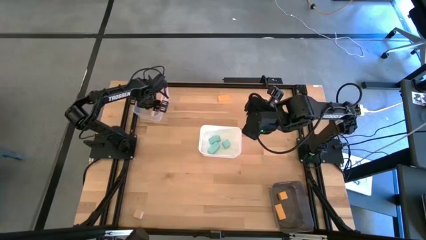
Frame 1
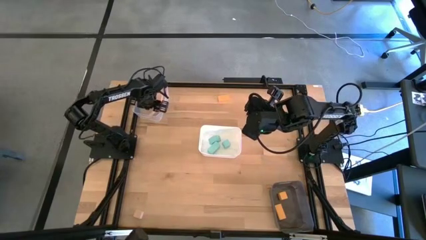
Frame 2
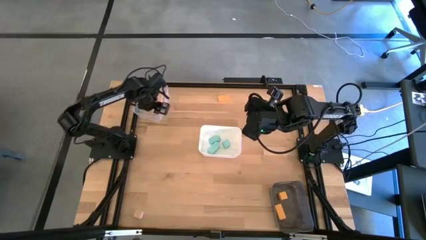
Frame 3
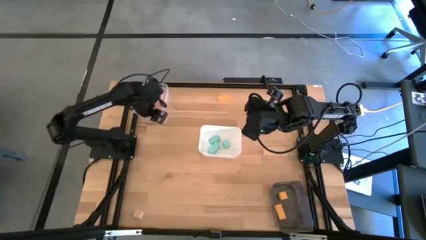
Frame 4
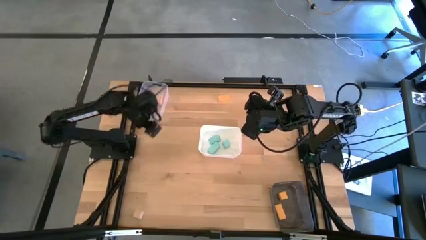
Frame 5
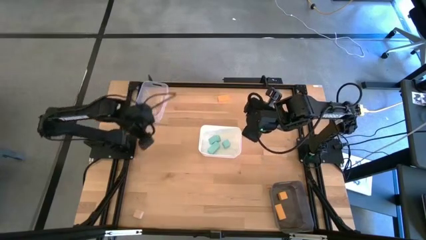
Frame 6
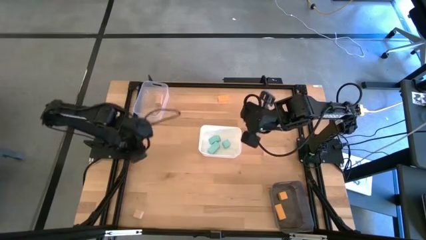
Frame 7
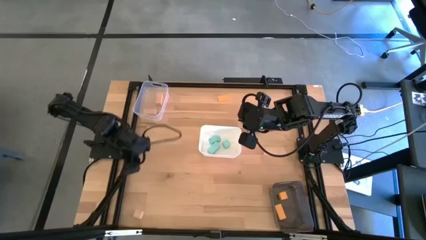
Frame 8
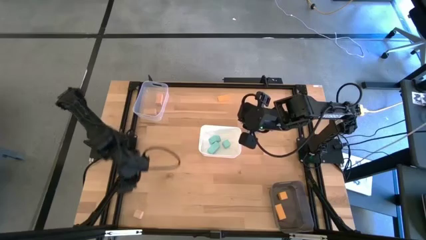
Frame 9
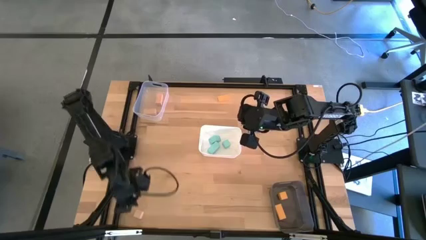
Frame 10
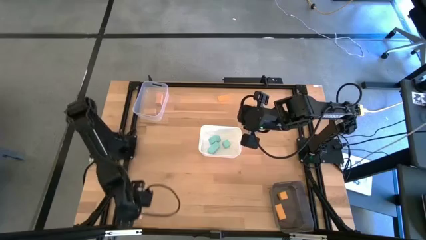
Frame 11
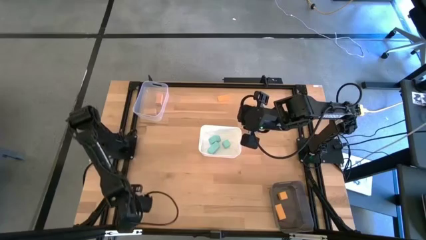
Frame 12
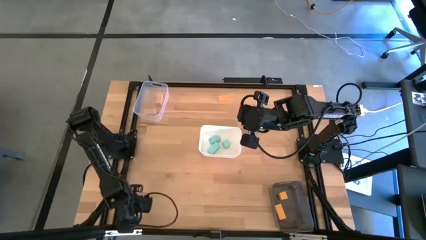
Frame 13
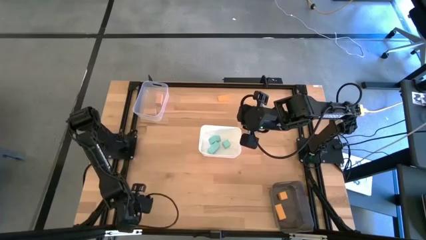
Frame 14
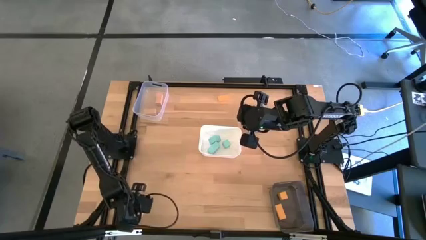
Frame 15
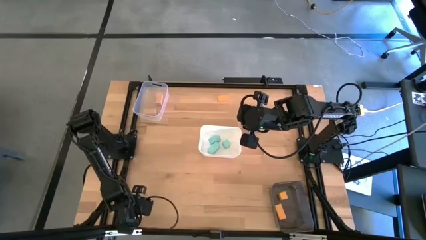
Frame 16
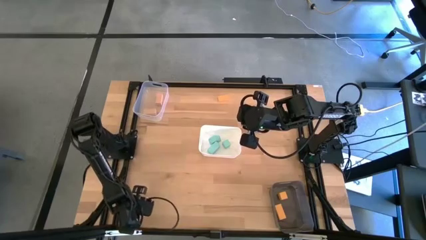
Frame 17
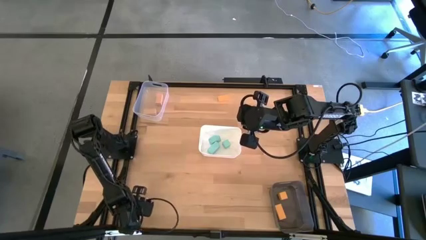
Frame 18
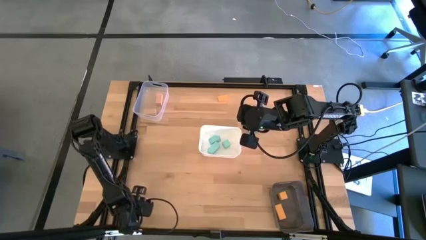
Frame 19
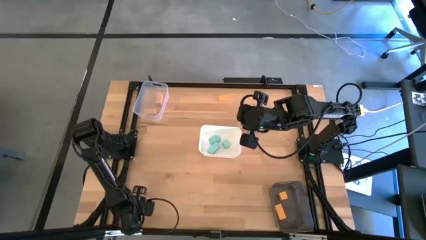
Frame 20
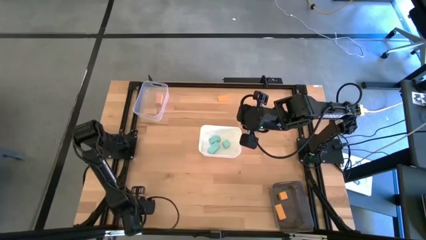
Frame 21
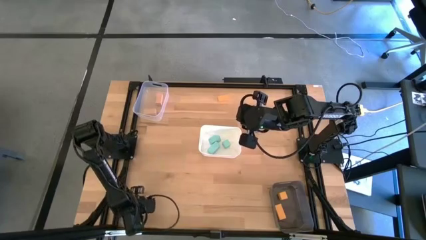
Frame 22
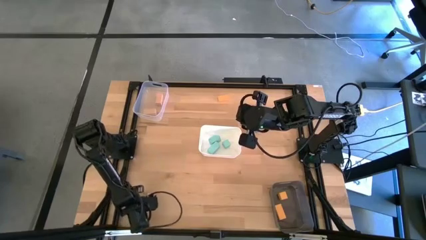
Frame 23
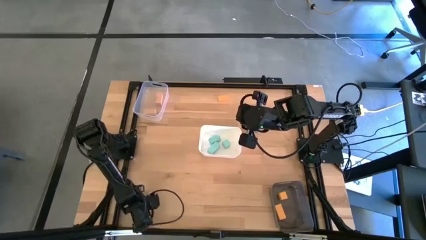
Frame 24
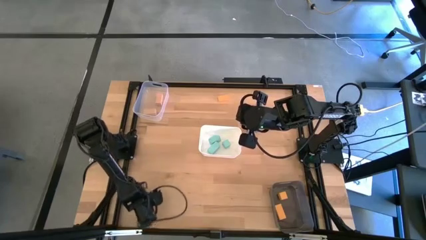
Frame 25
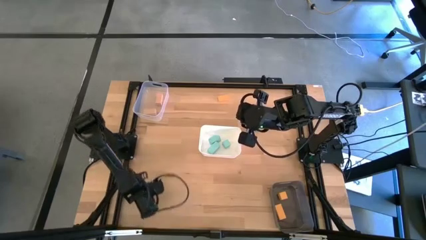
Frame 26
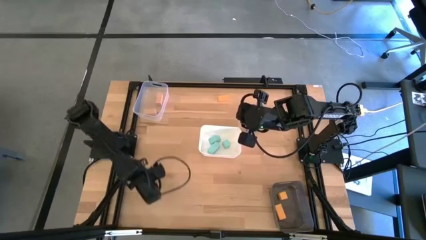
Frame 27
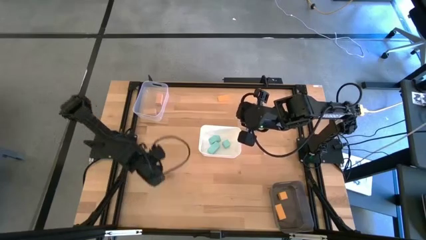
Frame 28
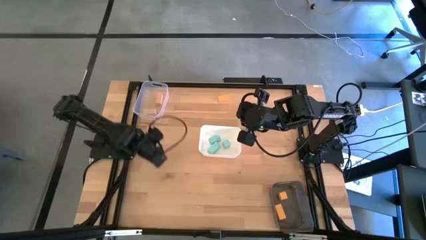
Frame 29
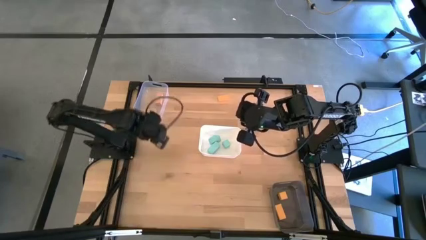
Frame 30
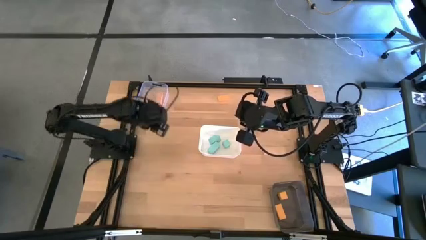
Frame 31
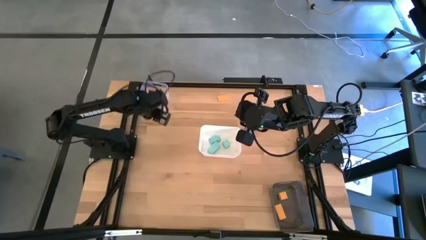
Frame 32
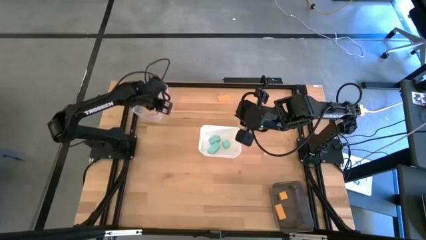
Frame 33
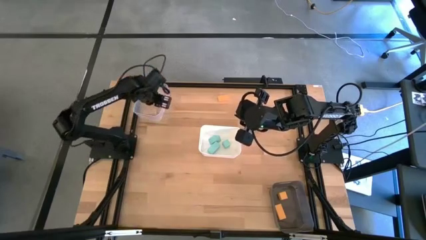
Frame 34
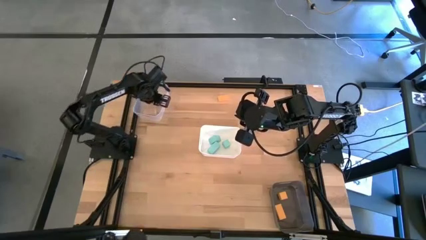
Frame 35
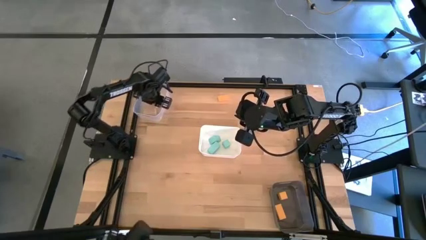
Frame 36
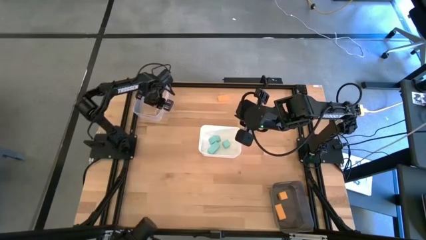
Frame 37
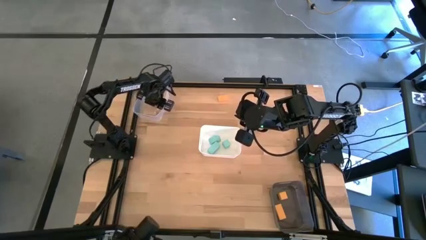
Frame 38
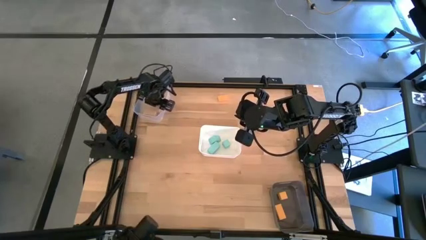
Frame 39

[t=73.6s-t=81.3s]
Task: Sort & place blocks by color
Put the light brown block into the transparent bin

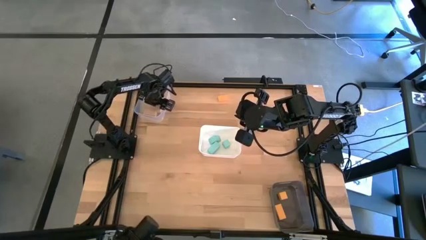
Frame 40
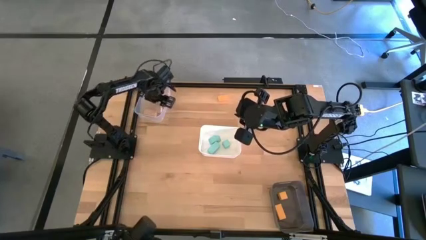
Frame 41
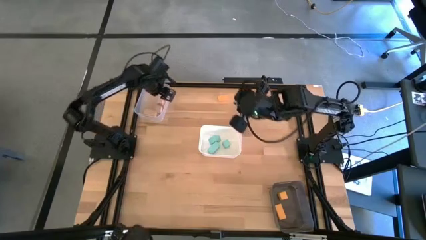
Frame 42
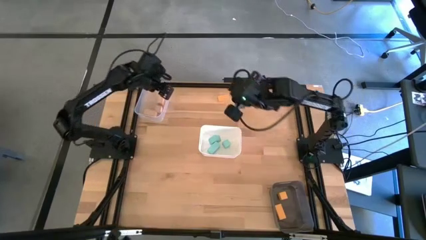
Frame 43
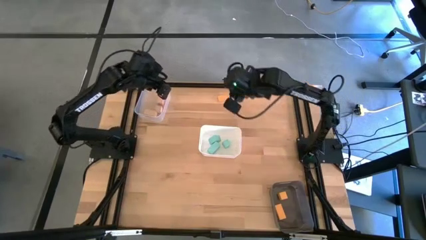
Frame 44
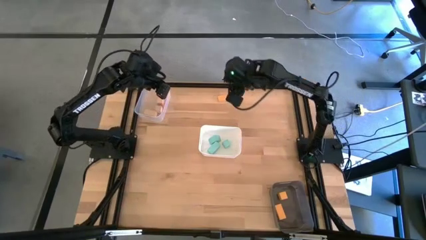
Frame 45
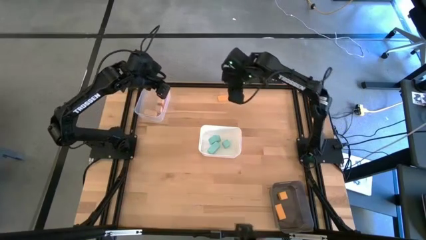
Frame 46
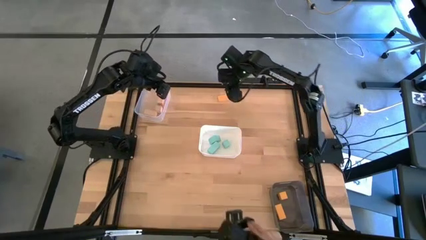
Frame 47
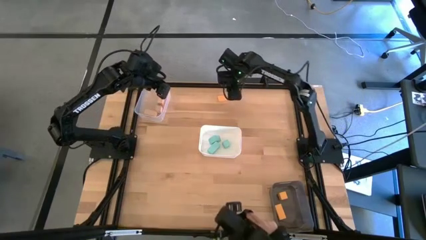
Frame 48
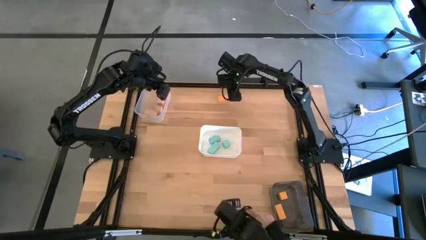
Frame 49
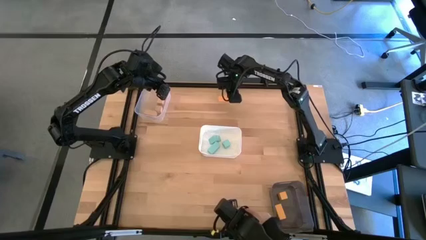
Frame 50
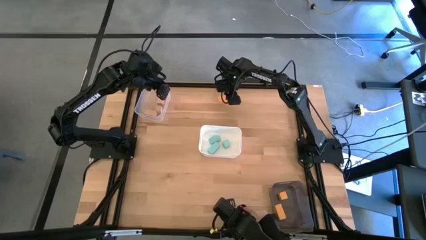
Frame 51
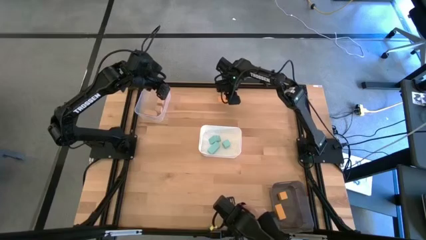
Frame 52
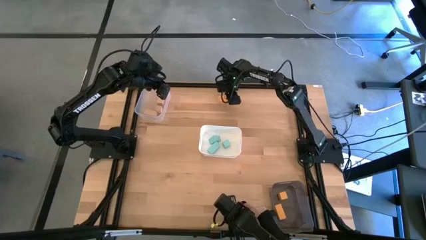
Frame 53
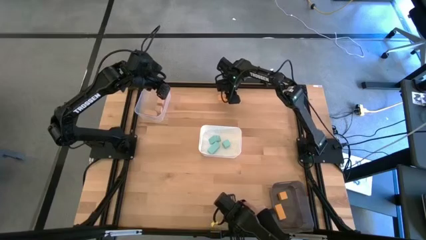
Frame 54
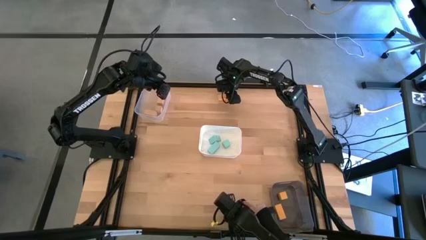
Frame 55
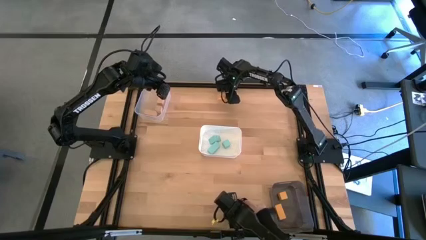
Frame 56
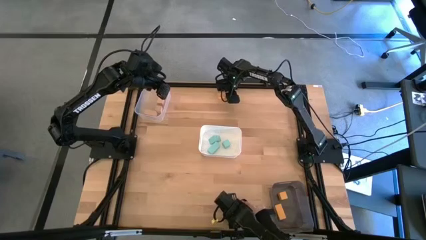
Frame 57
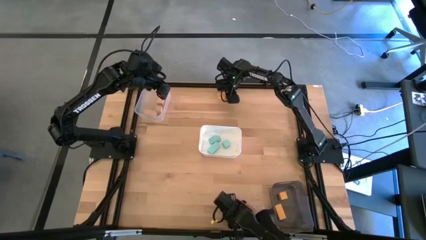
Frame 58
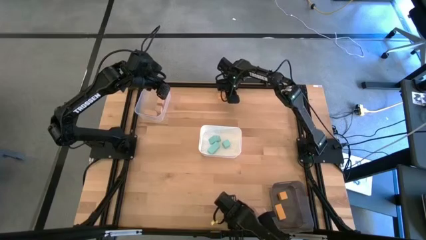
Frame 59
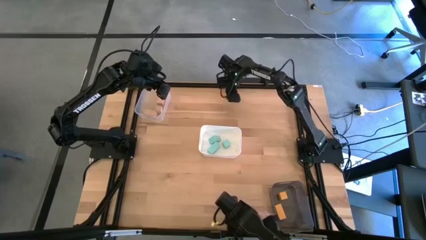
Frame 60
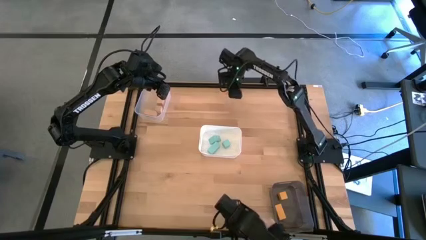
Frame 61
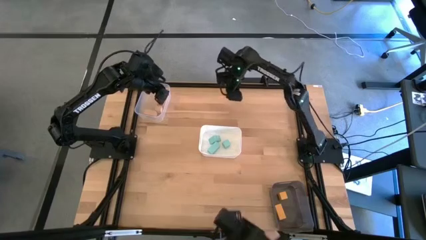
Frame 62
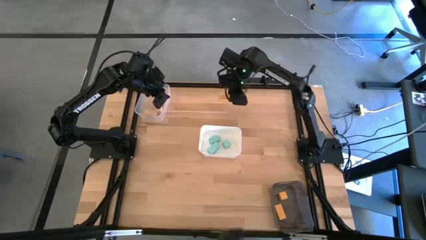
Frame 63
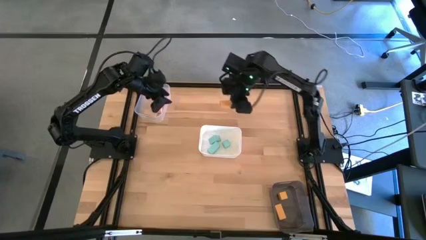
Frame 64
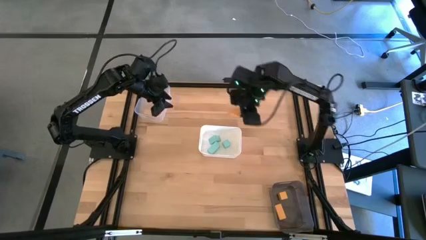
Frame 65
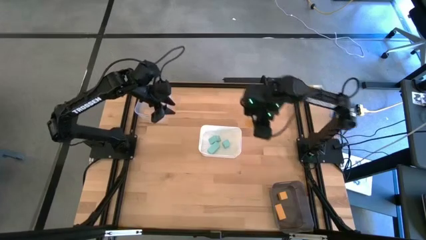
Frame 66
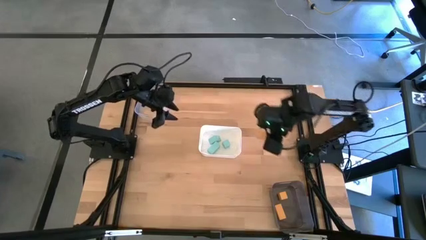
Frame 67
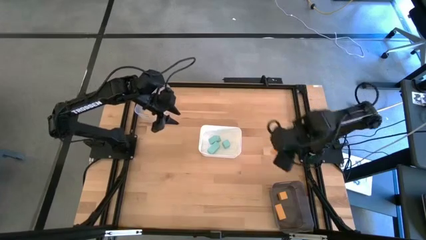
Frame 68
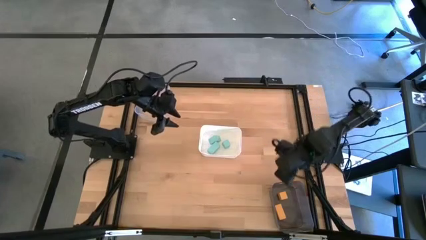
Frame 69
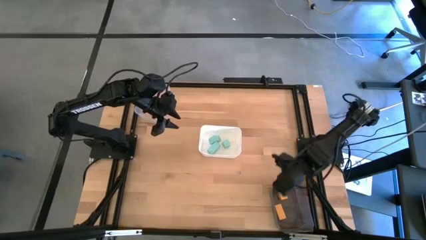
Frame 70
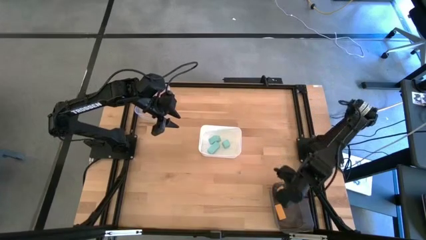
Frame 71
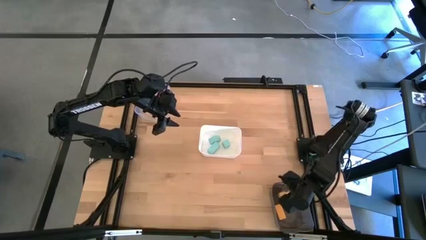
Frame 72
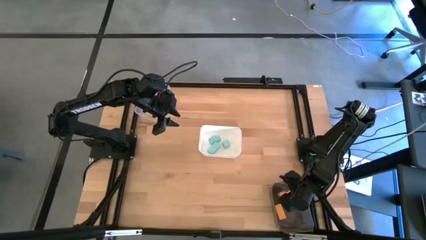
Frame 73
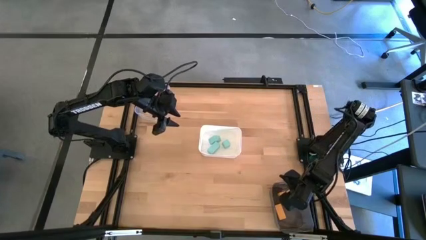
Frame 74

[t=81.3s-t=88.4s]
Put the yellow block into the black bin

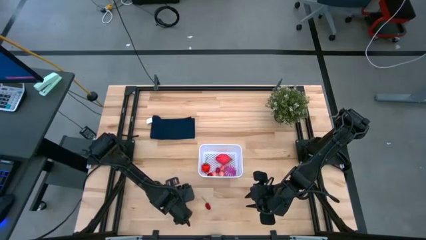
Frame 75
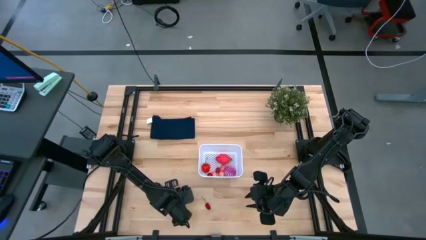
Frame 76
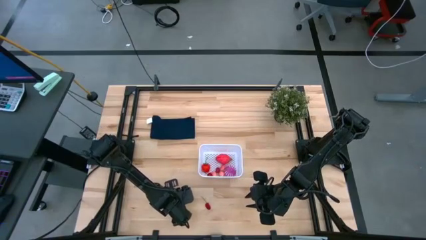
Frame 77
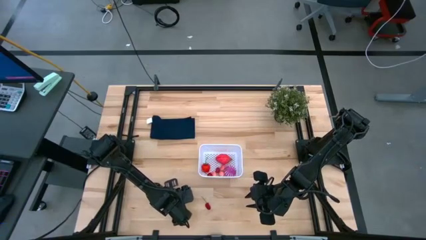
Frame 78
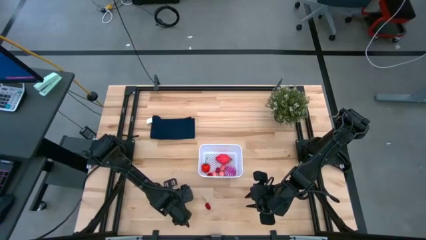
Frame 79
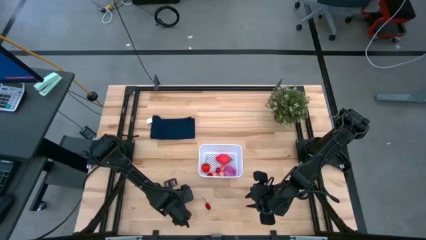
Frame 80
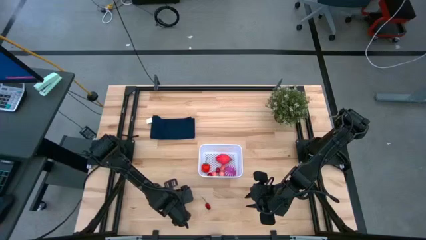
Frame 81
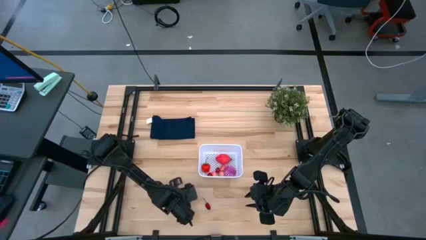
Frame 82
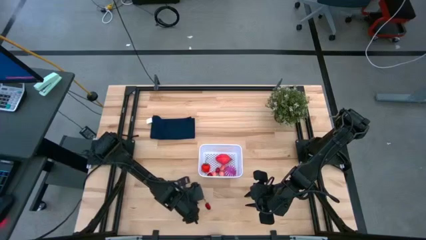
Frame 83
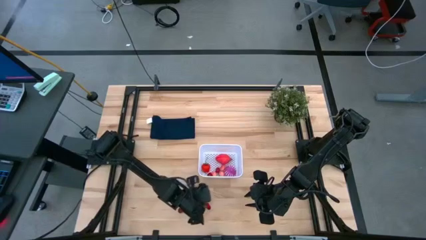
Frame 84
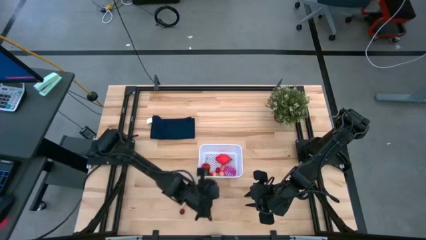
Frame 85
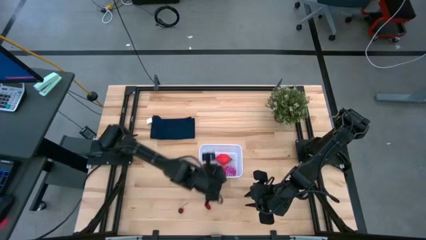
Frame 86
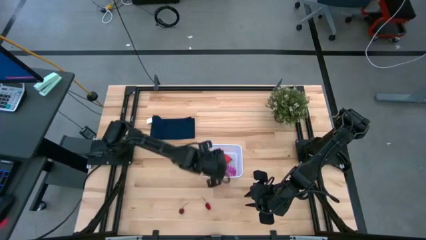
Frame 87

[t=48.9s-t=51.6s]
Task: Pick and placing Produce into tupperware
Put the raspberry into the white bin
